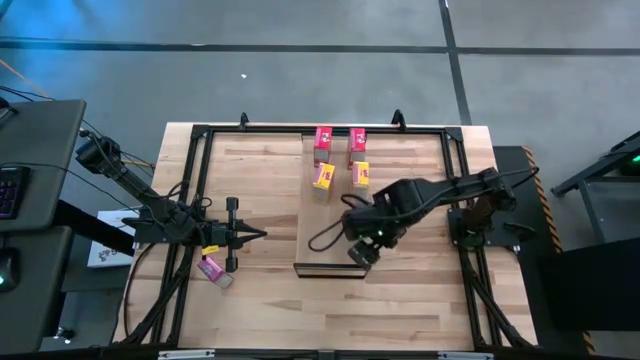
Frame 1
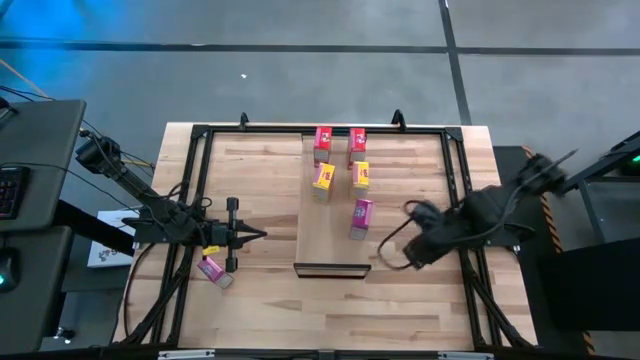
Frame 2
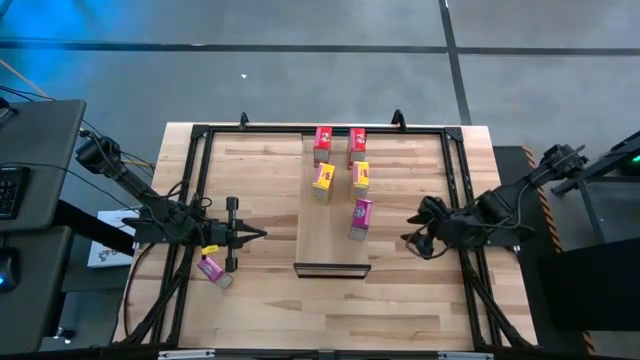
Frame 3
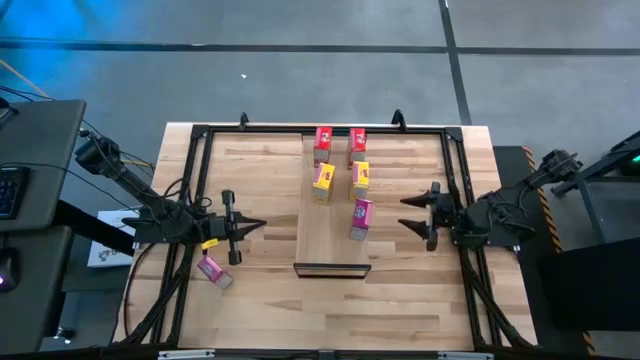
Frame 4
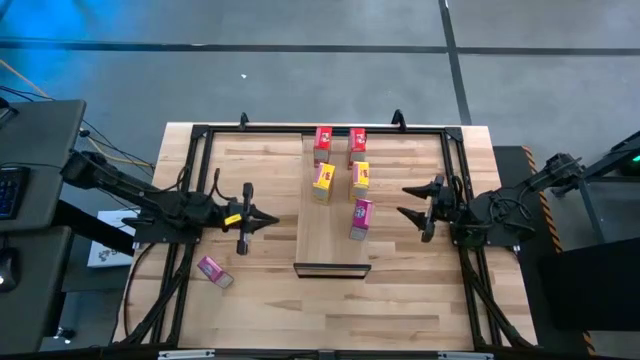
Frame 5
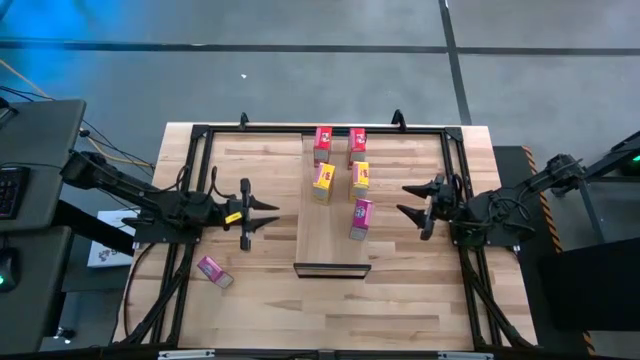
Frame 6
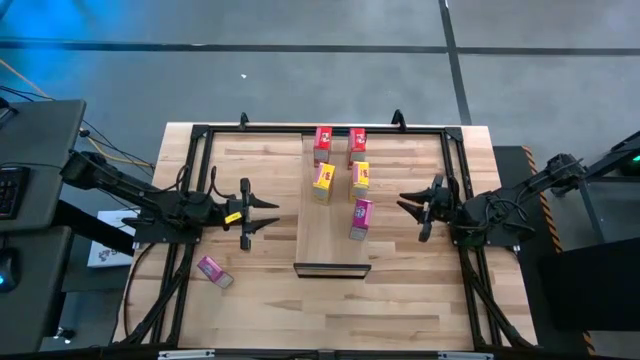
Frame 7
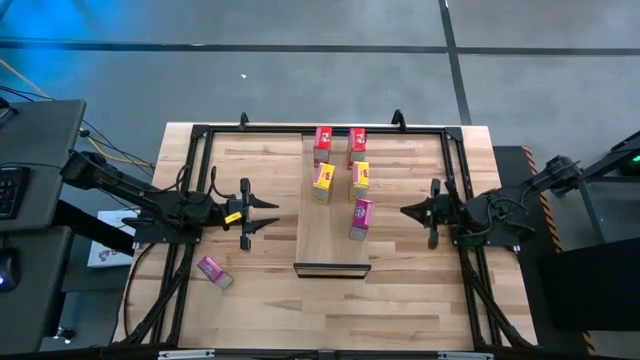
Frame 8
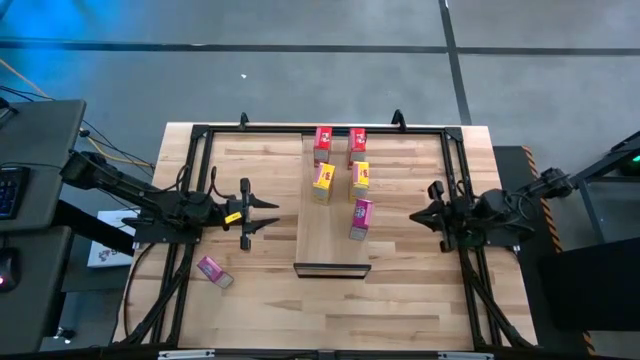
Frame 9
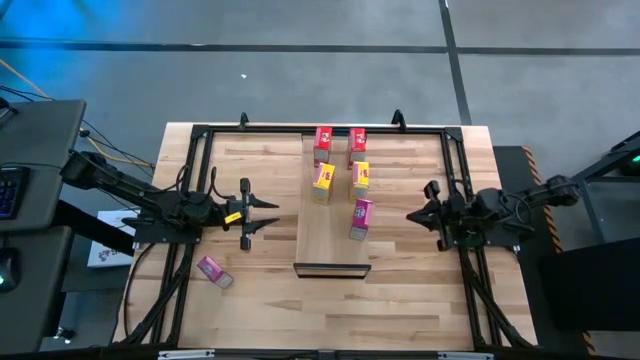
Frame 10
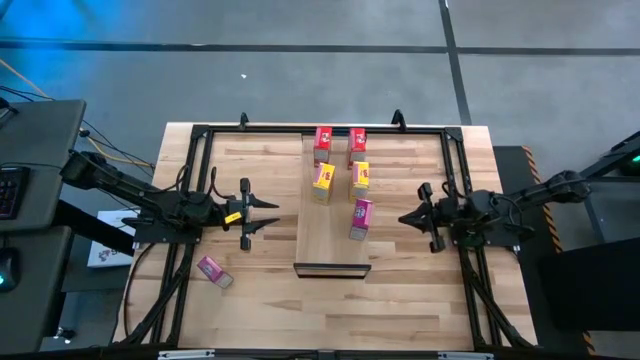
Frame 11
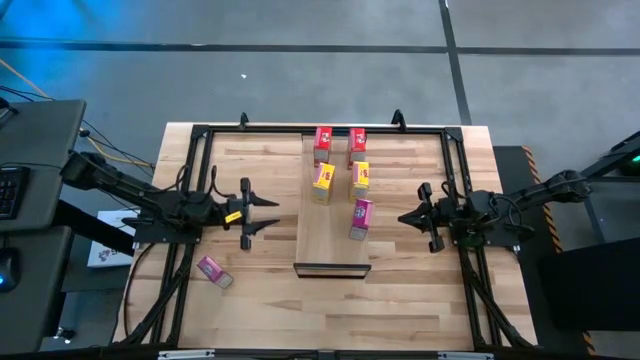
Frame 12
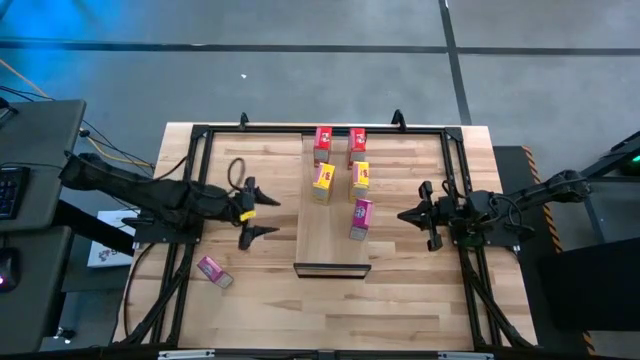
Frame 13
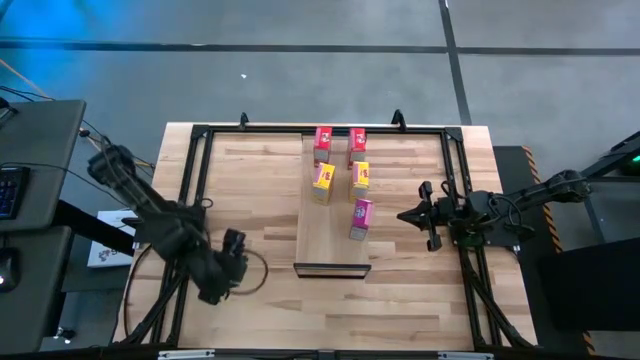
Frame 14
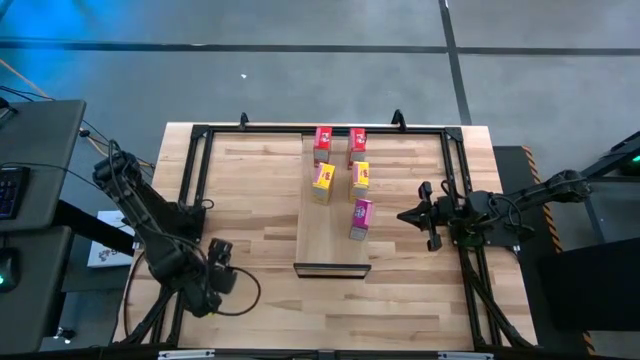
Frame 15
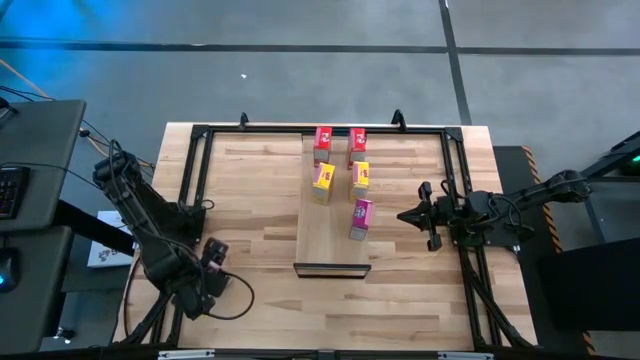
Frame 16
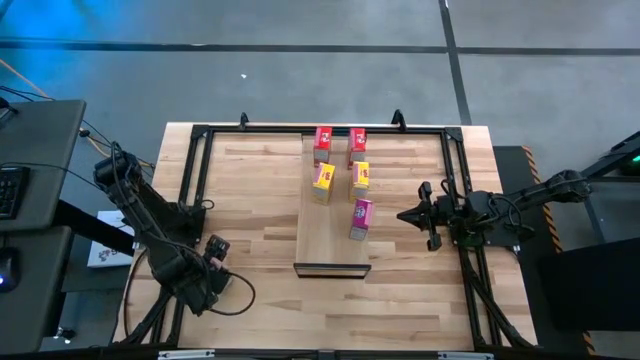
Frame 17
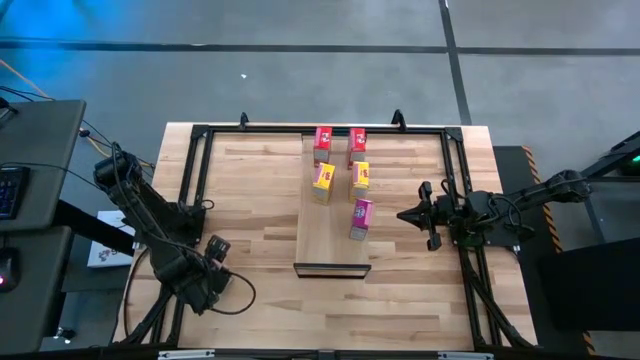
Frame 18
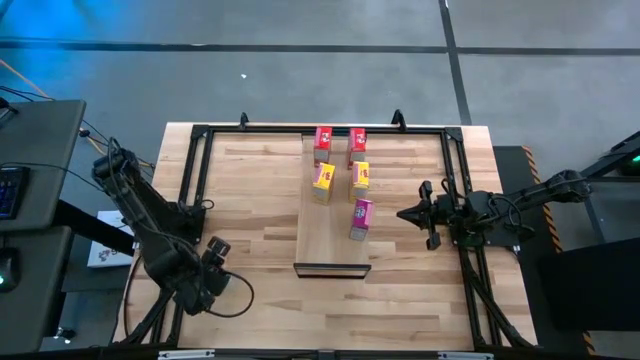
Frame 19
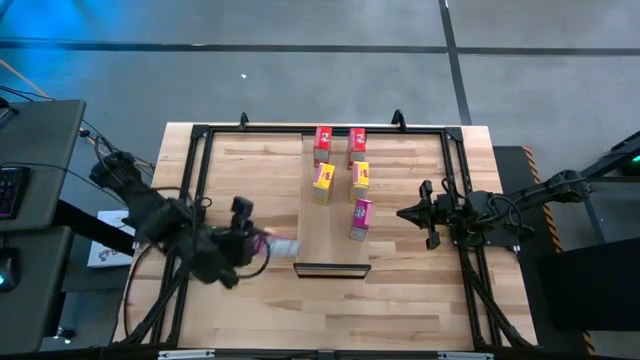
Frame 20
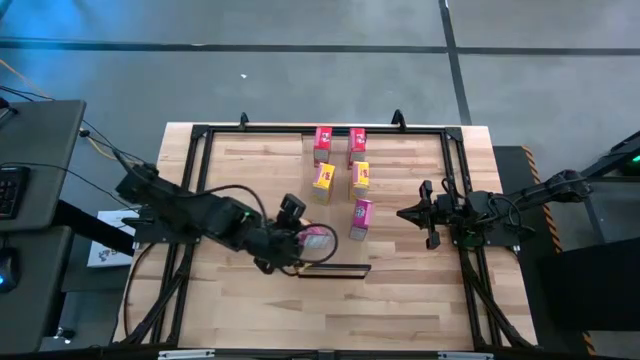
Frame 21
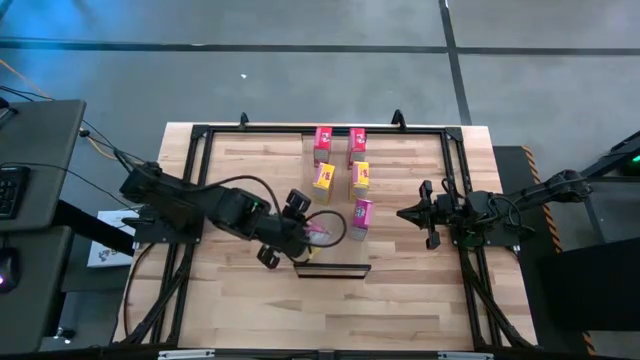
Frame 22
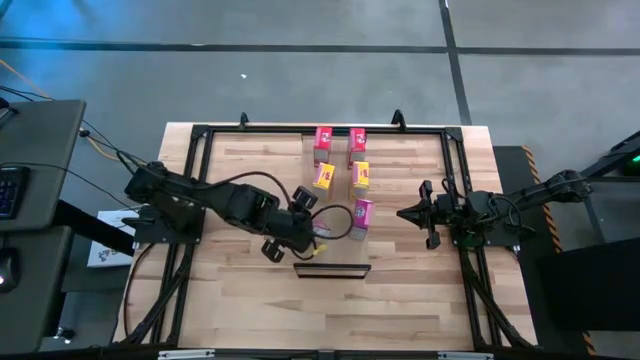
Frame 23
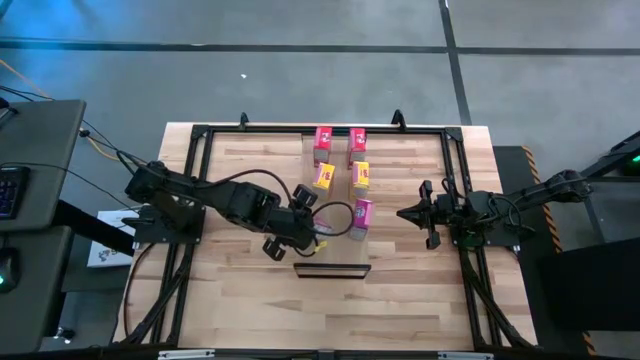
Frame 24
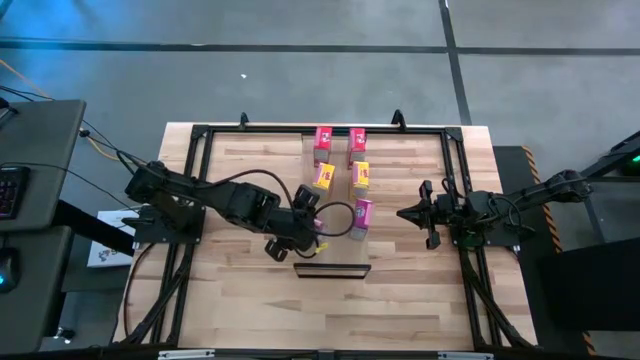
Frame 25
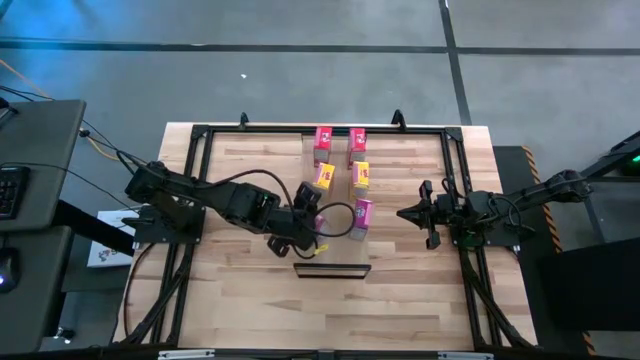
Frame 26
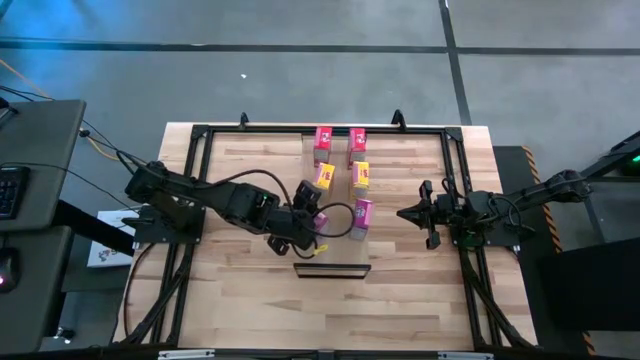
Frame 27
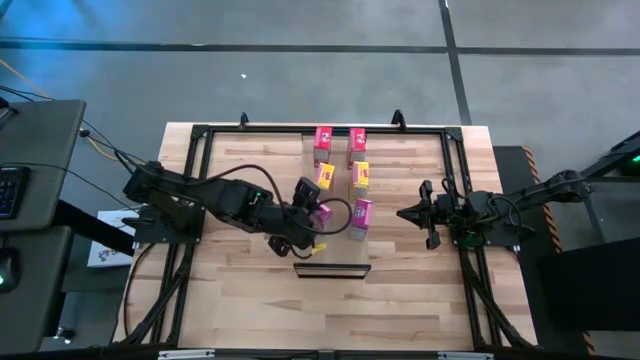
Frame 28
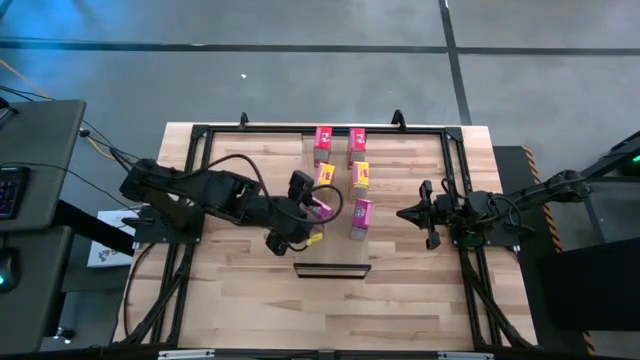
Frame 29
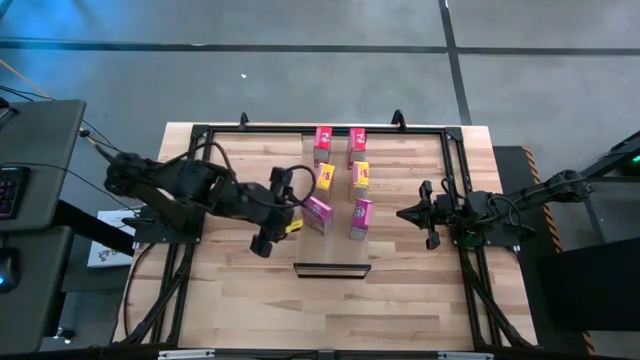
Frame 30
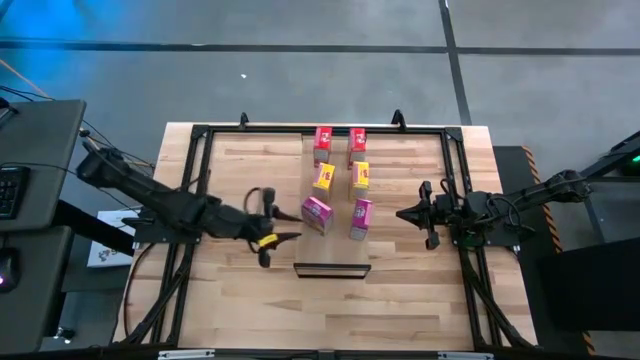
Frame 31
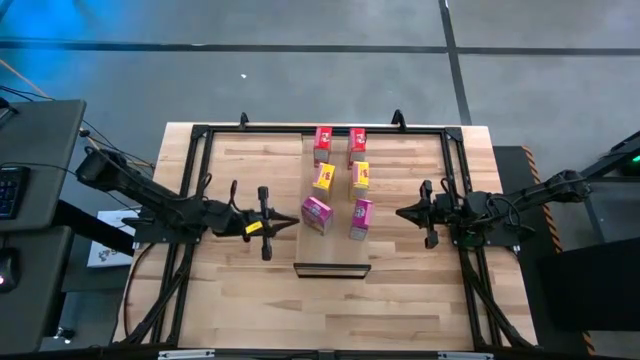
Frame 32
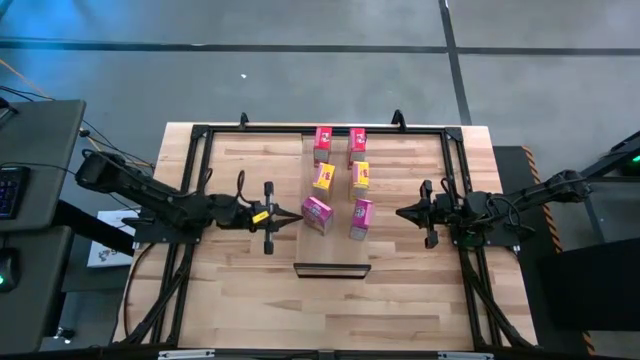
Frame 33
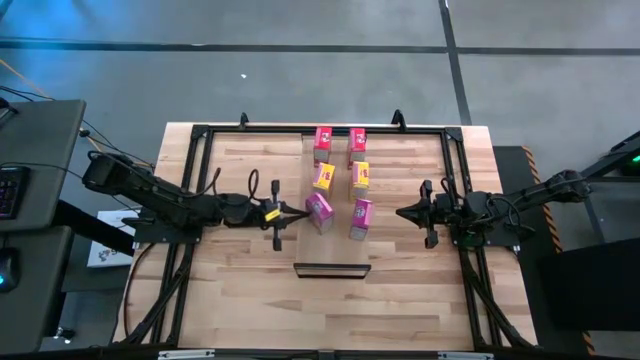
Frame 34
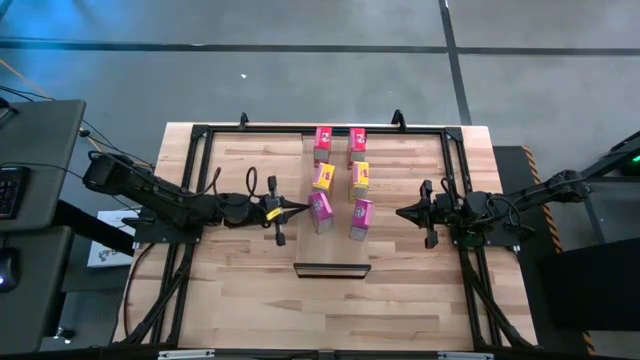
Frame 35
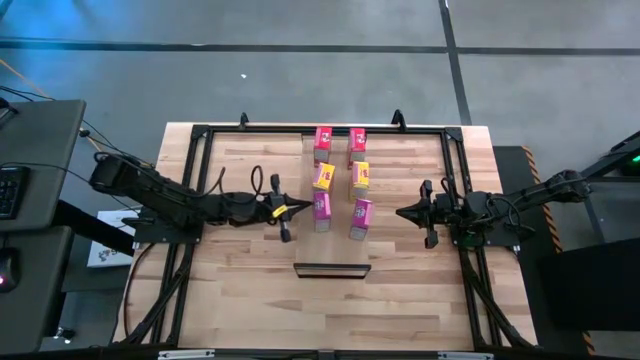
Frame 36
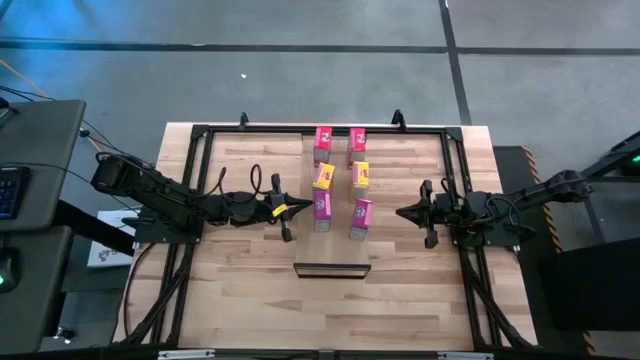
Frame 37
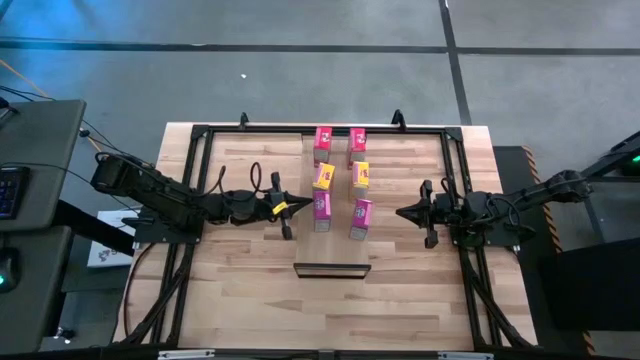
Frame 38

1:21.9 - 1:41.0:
Task: Stack cereal on shelf
Put the purple cereal box on the shelf aligned with the other purple cereal box

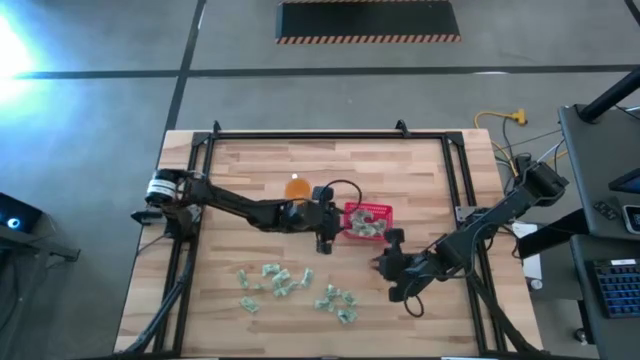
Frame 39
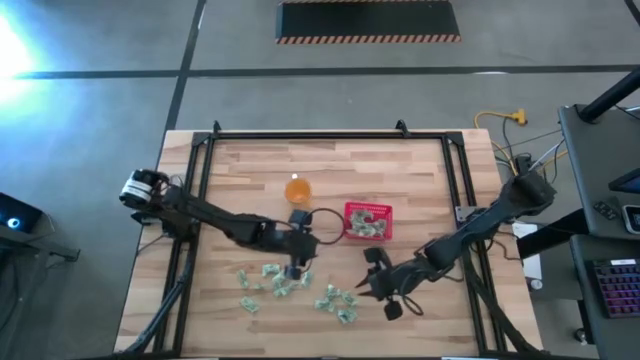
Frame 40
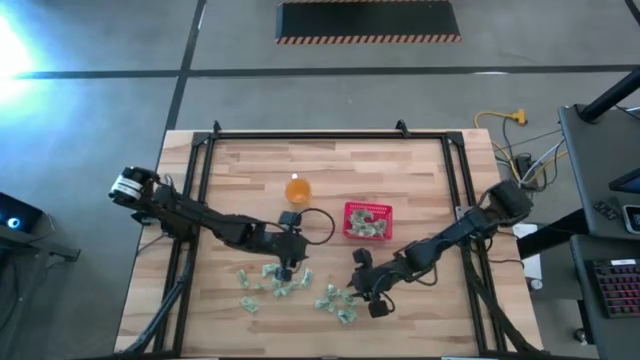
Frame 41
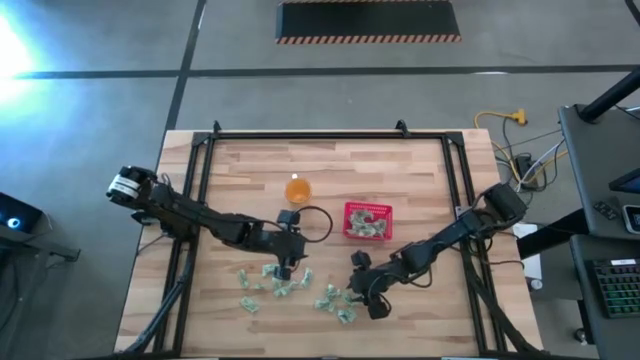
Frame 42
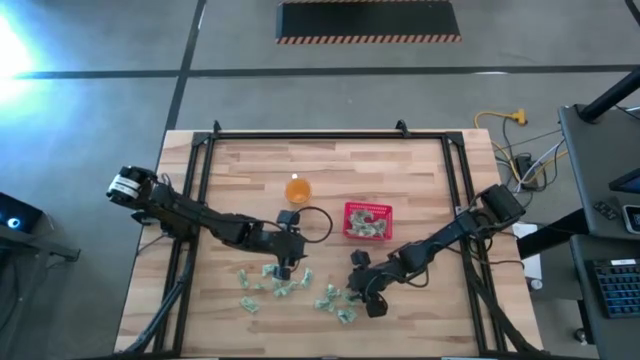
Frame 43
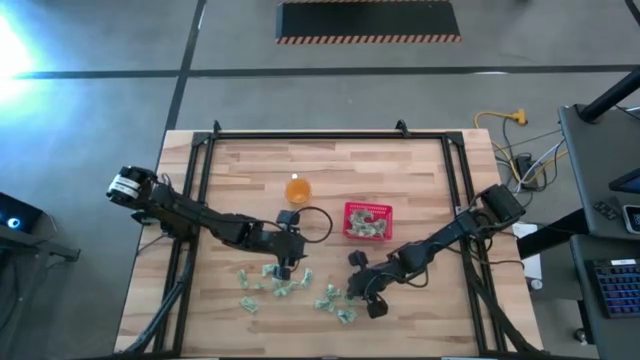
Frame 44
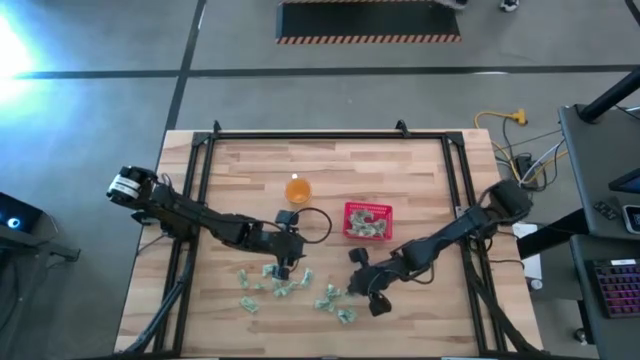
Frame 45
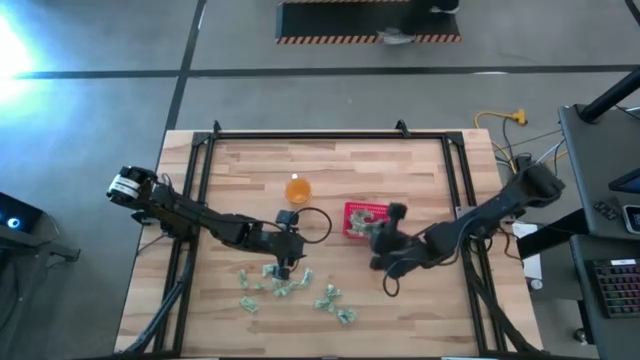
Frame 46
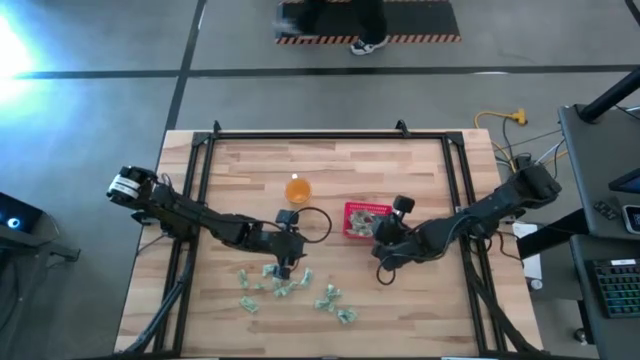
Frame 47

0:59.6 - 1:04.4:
Task: Pick and place Stevia / Truvia into bins
Put the stevia packet into the basket
